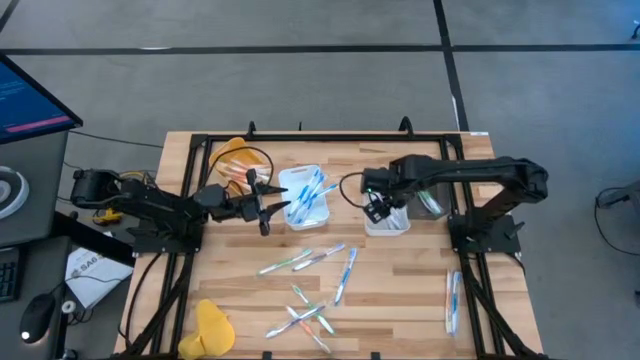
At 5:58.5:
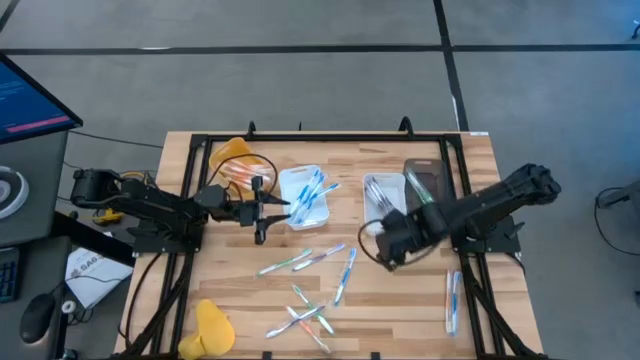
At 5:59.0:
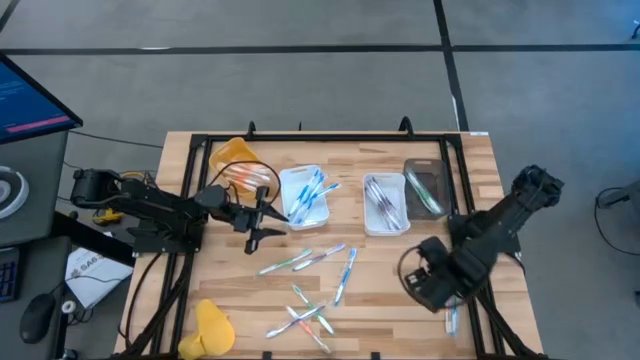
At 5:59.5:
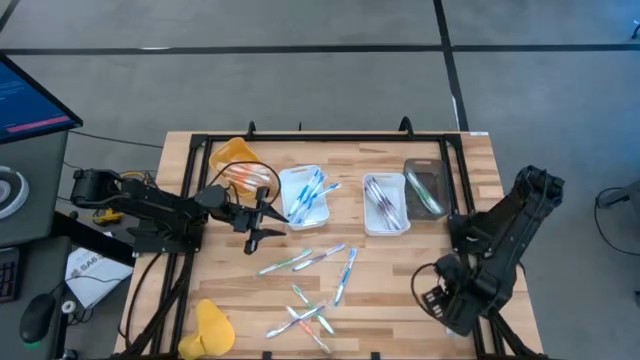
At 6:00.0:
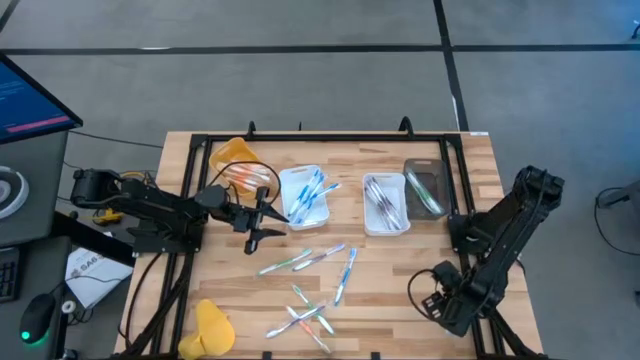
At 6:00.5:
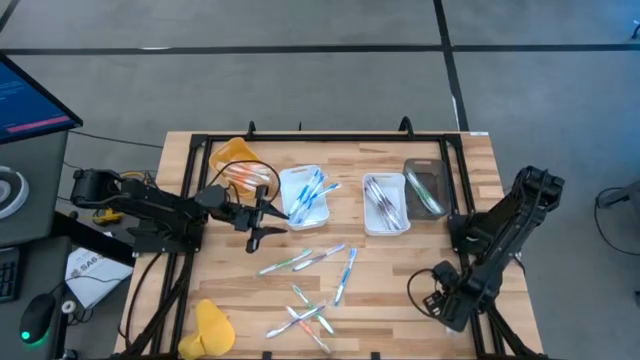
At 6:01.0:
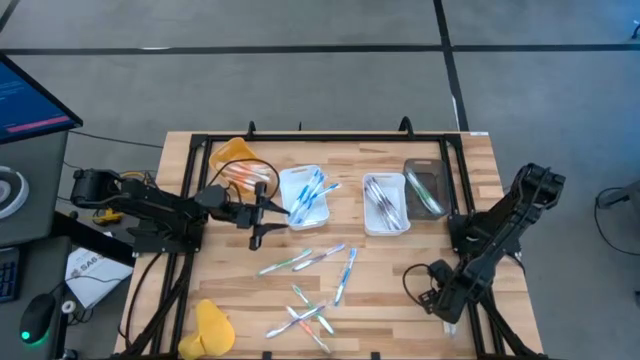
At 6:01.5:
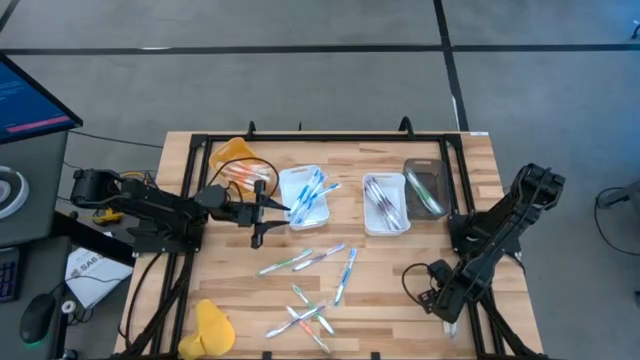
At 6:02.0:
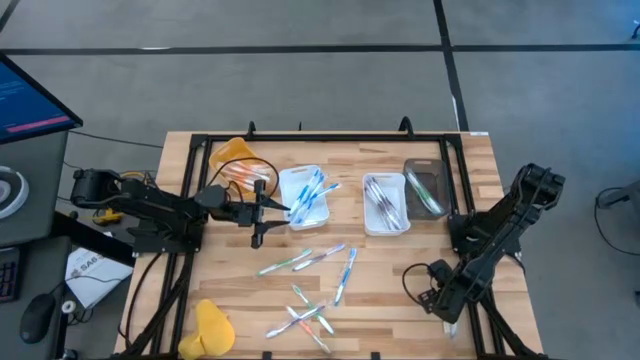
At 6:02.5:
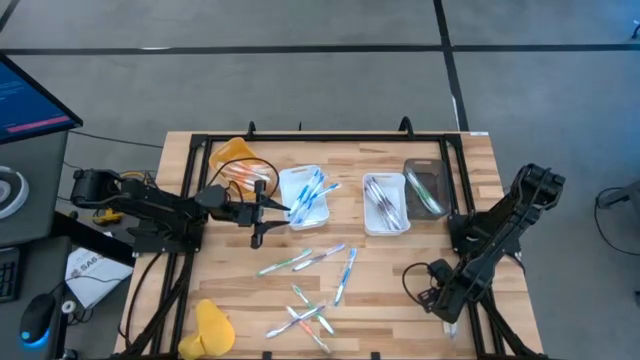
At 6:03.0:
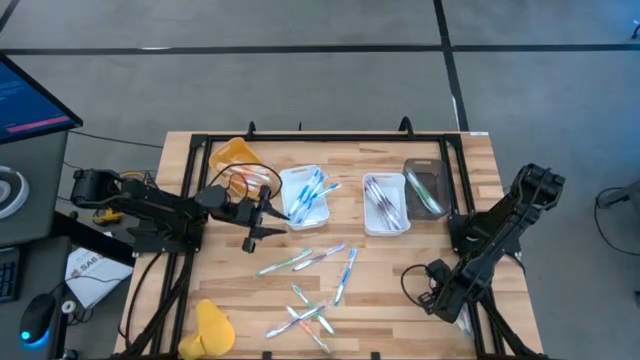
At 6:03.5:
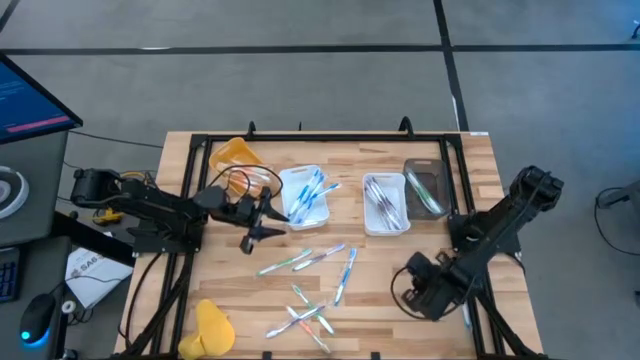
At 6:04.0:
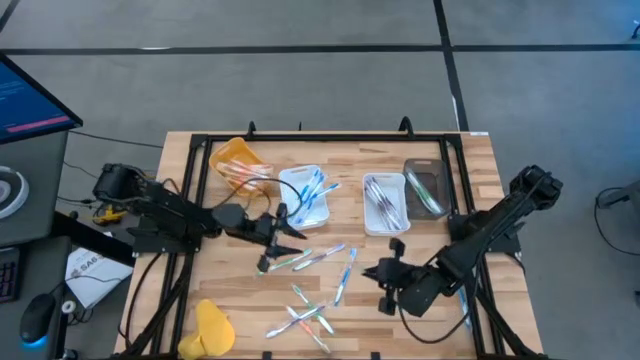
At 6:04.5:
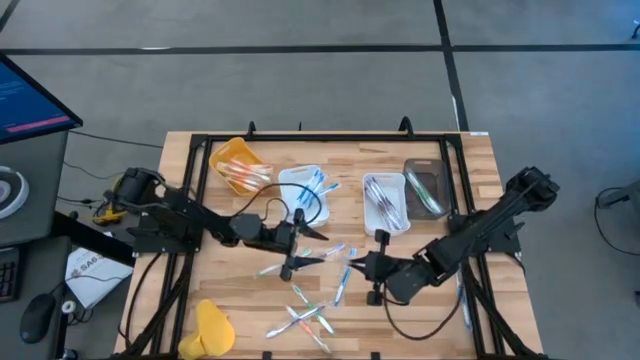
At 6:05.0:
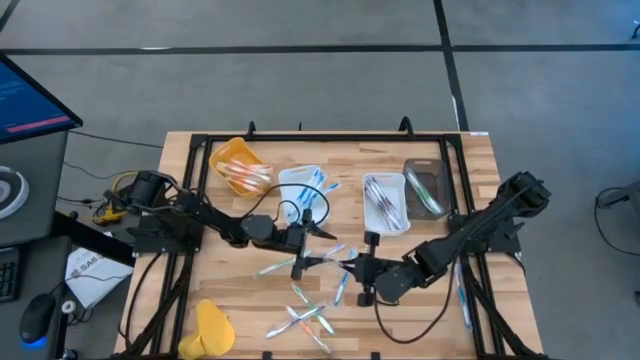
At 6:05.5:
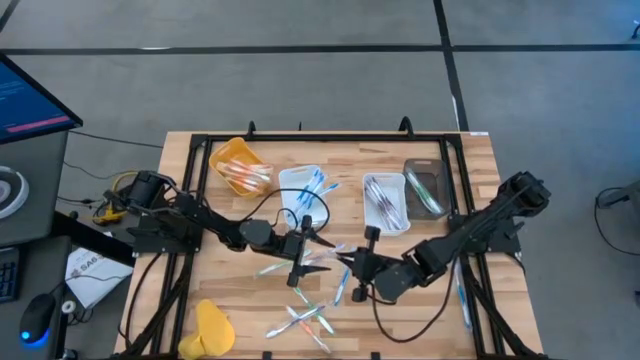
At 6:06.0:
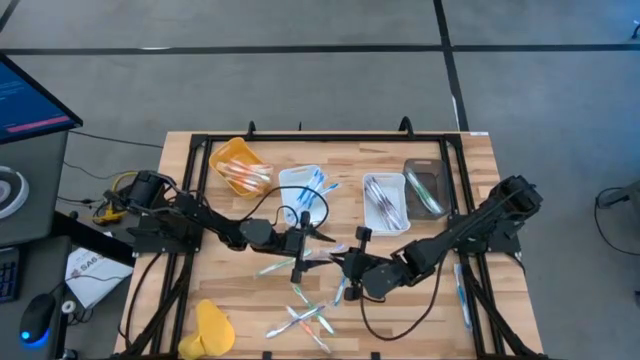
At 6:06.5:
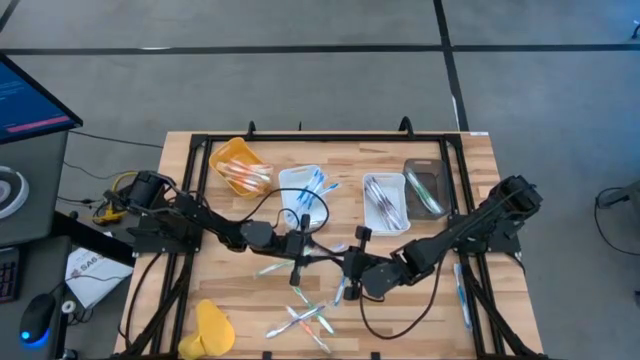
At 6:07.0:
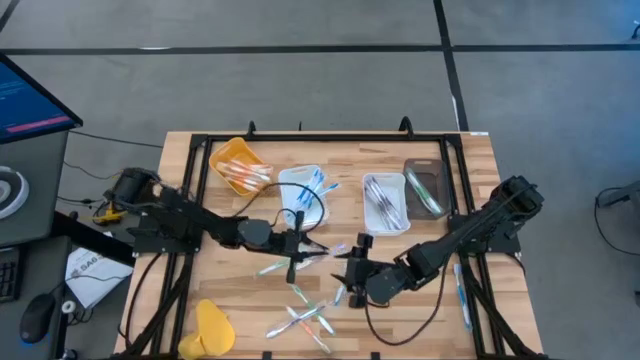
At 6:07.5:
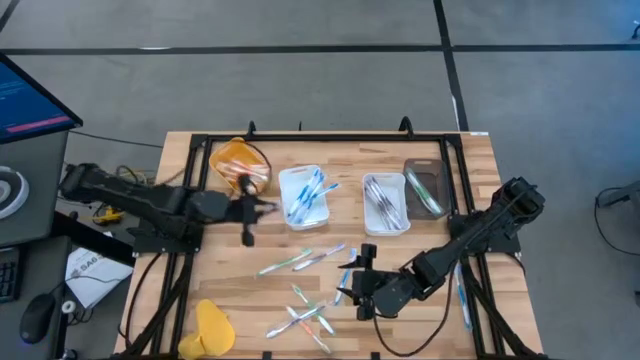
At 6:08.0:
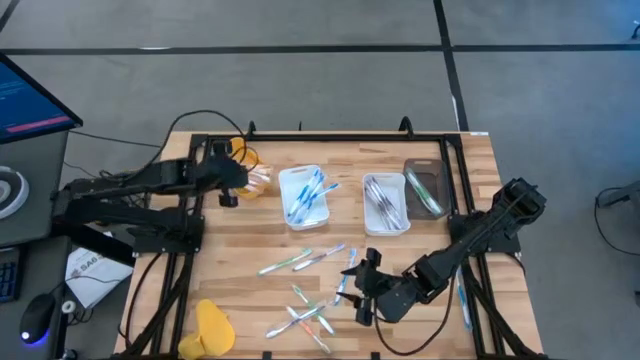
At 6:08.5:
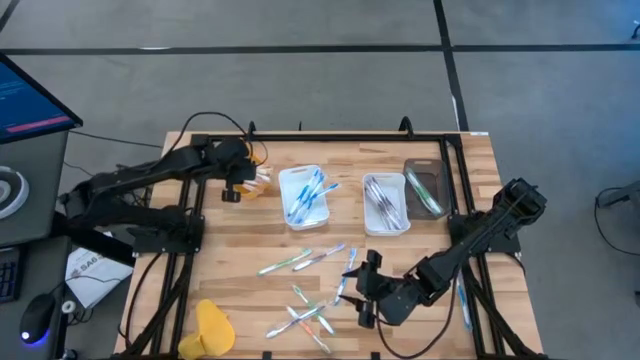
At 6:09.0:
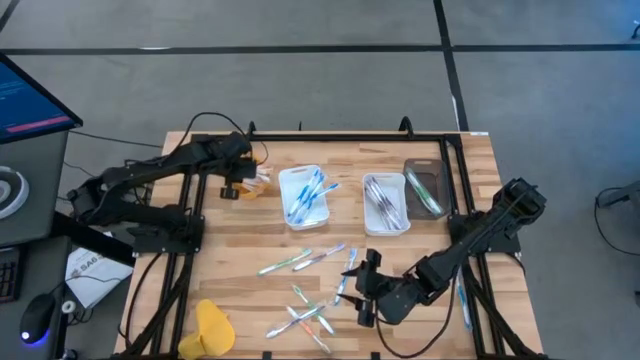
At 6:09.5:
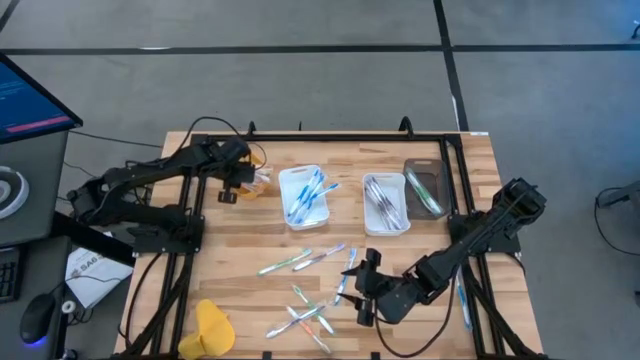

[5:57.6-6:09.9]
Task: Pick & Place Toothbrushes
Put the right orange toothbrush into the orange bin

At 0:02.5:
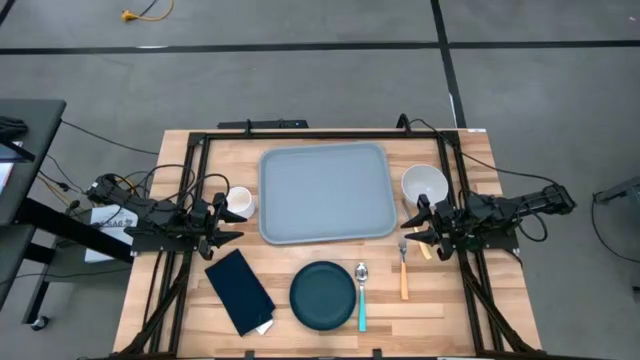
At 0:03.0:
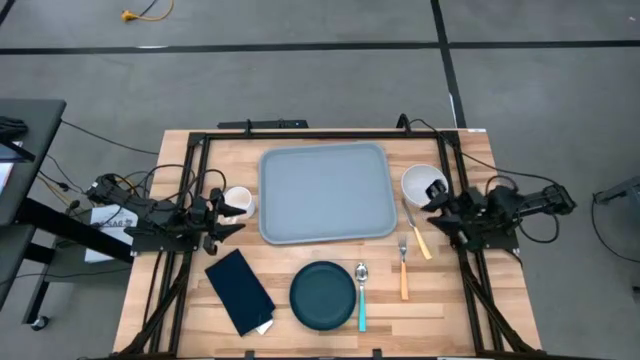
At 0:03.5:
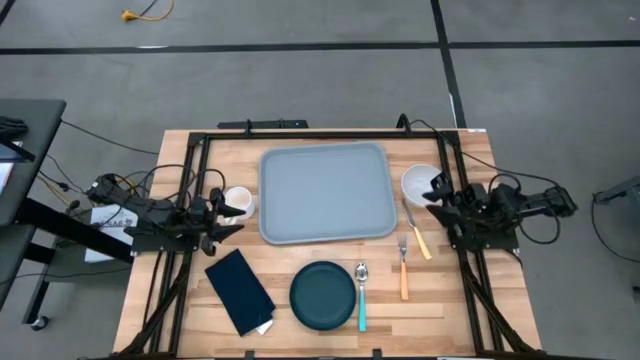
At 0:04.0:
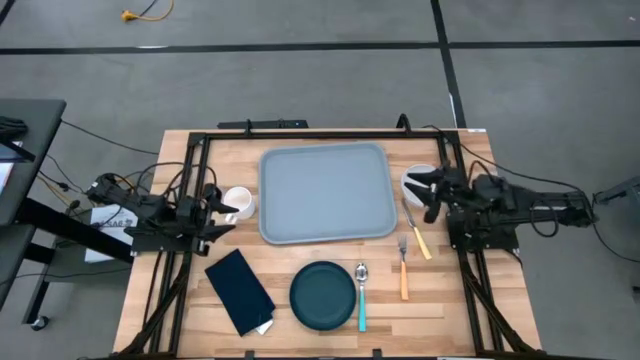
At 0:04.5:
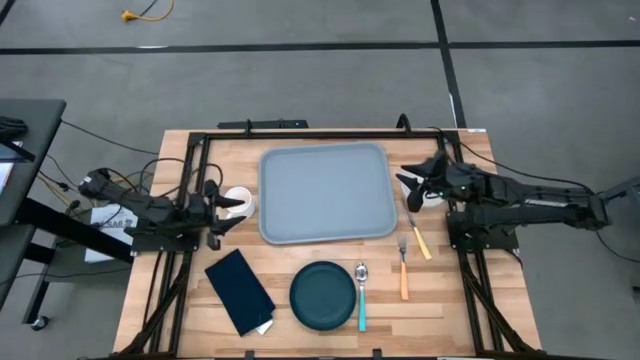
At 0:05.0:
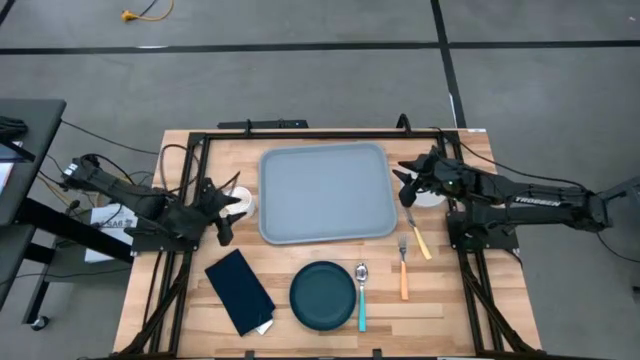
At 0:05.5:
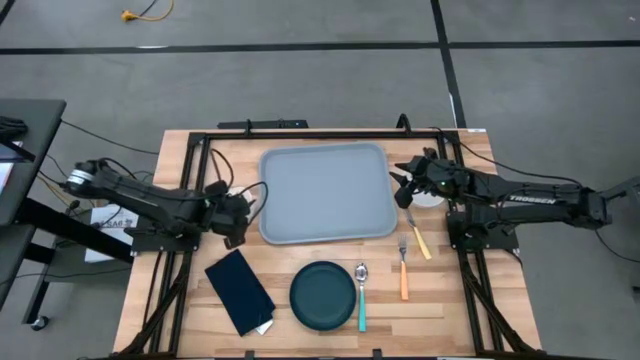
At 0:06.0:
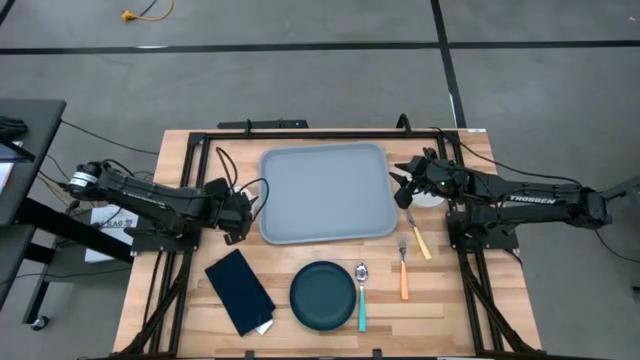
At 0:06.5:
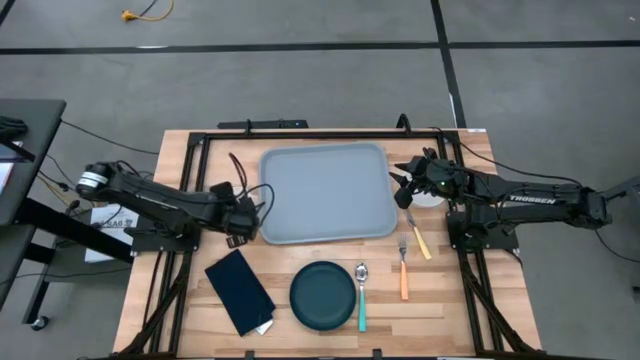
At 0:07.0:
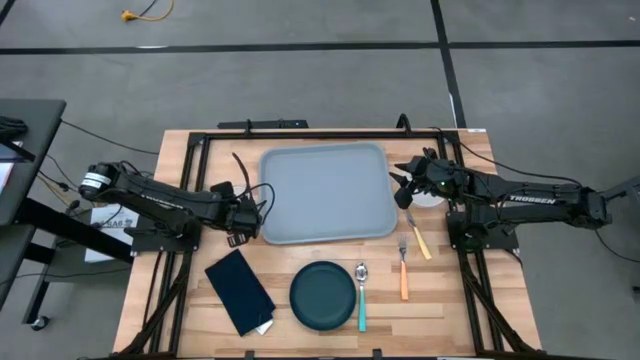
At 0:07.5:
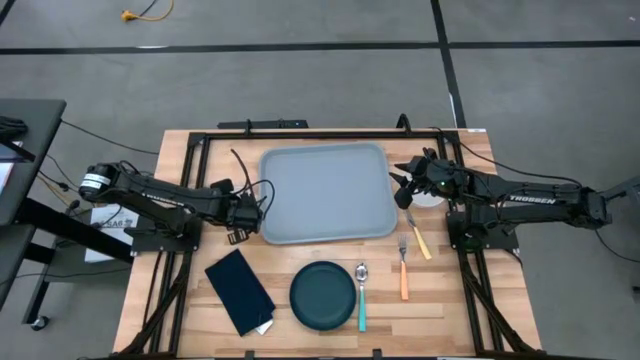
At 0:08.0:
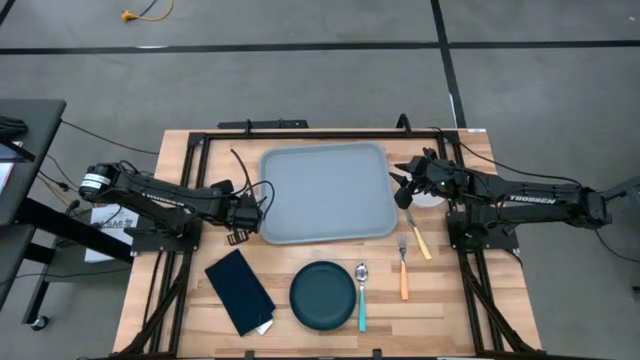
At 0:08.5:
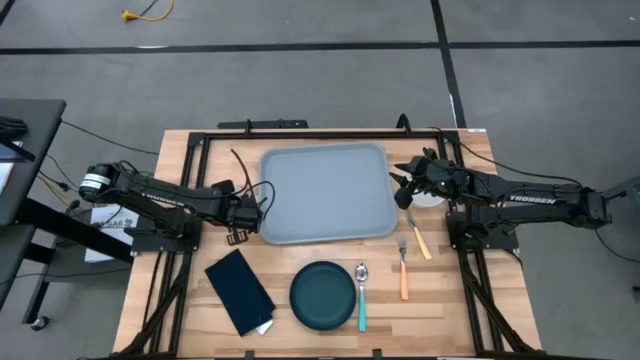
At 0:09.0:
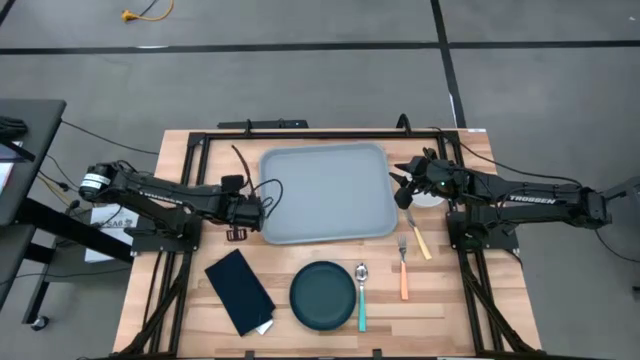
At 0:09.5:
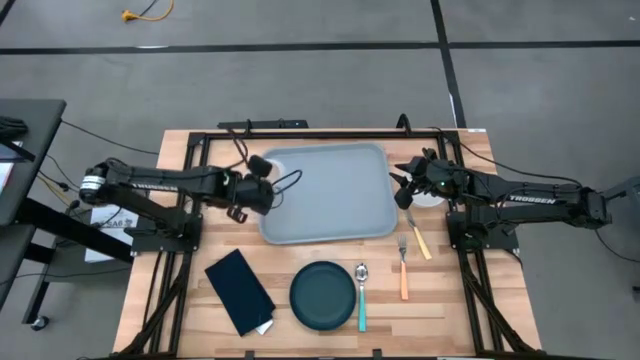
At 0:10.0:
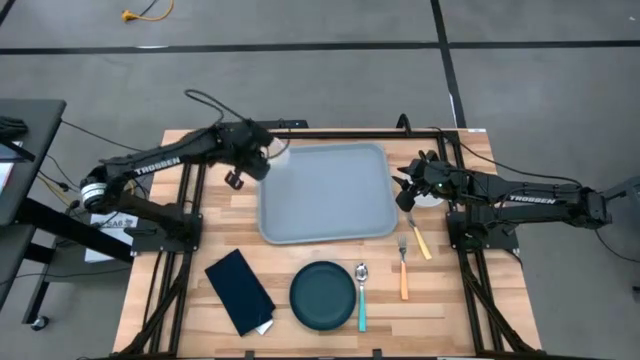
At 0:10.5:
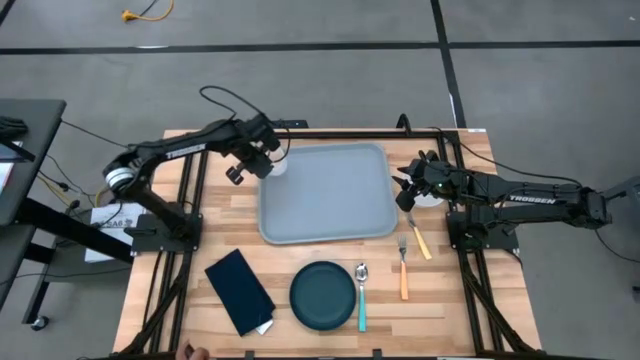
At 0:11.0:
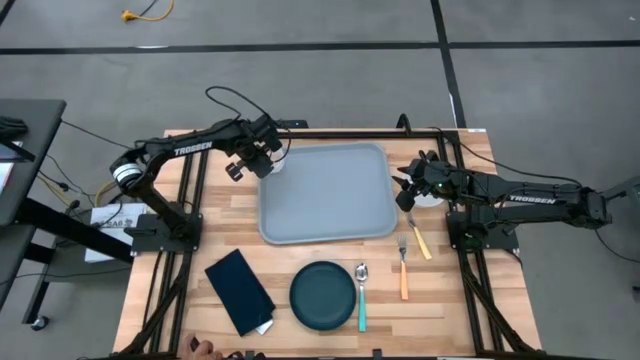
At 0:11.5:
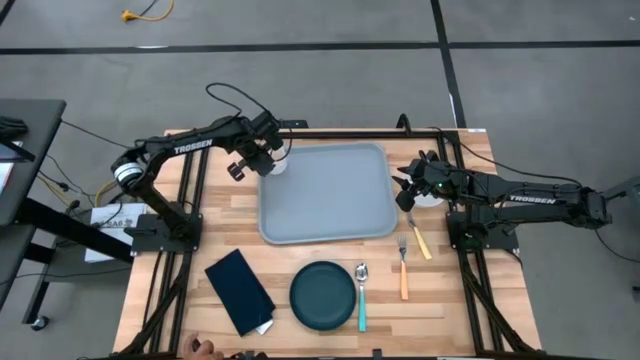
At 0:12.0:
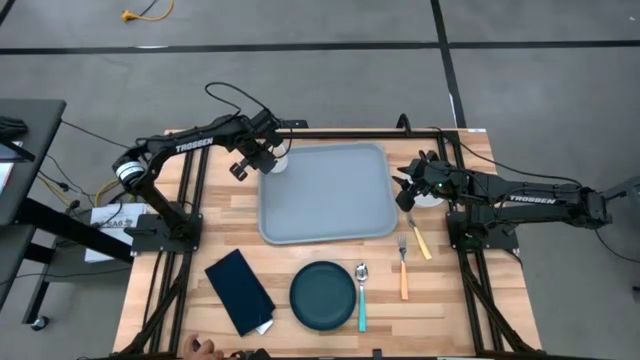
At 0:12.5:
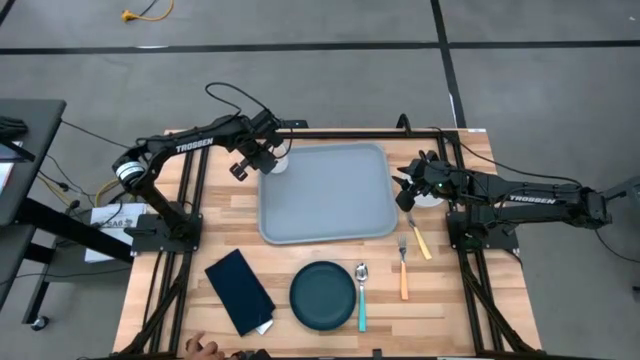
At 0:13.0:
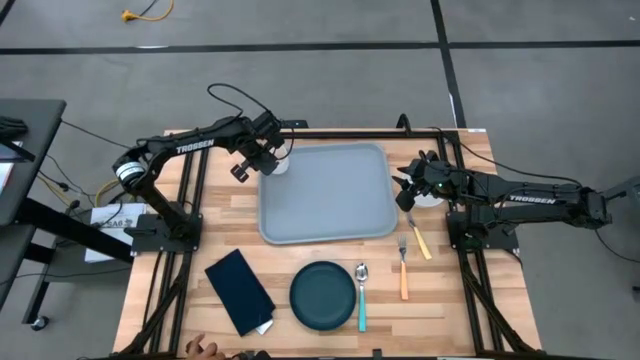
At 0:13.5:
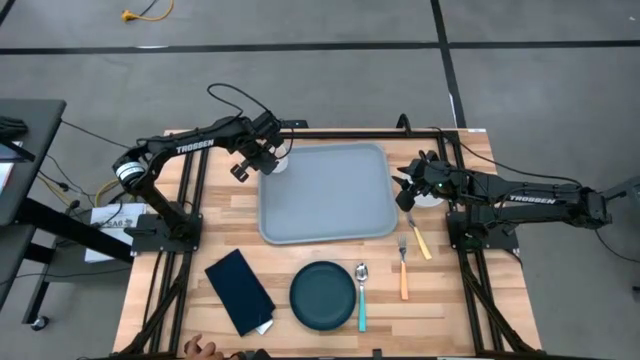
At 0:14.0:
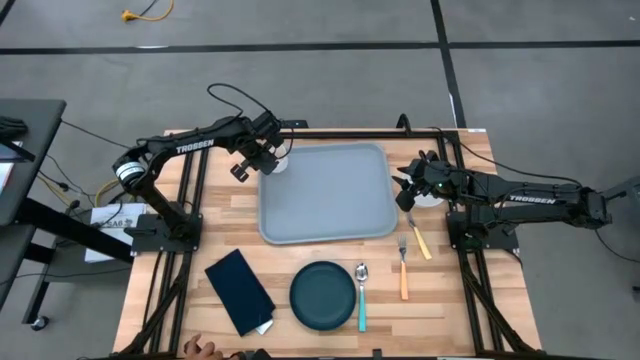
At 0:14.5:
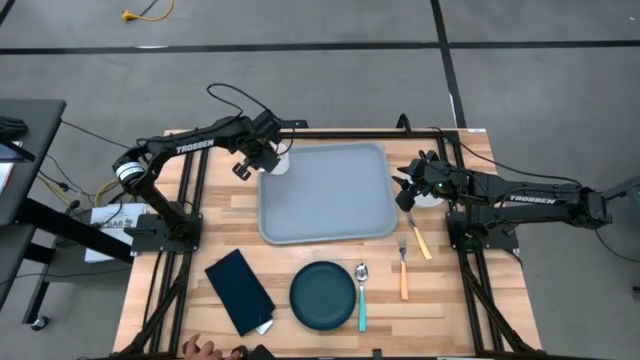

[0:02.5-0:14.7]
Task: Set up tray
Put the white mug on the gray serving tray
